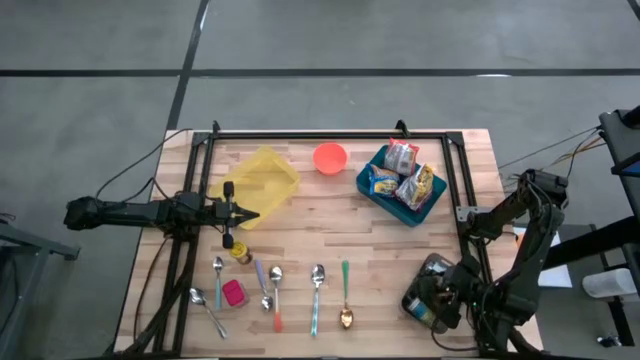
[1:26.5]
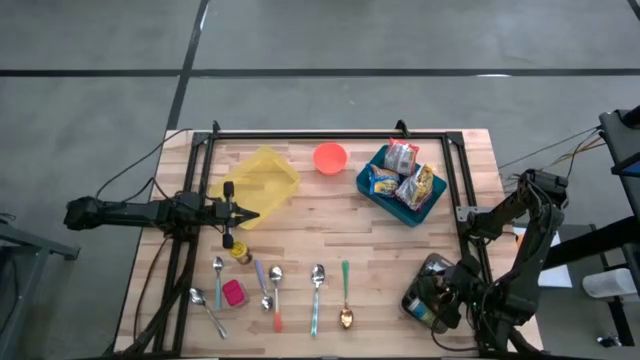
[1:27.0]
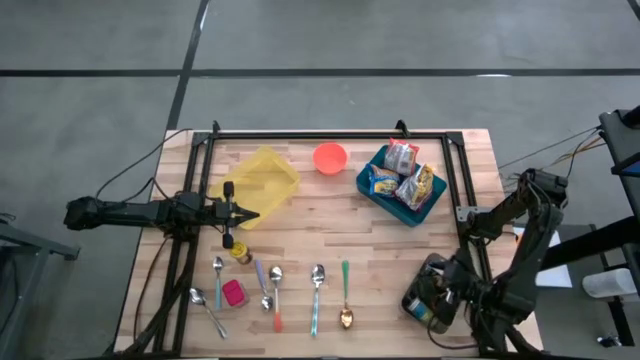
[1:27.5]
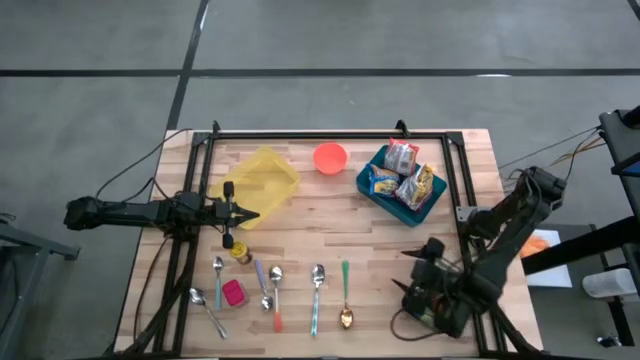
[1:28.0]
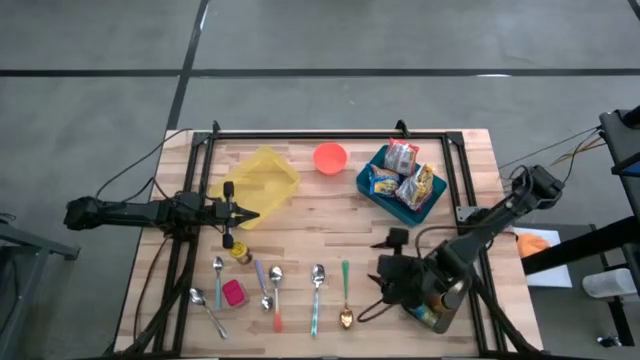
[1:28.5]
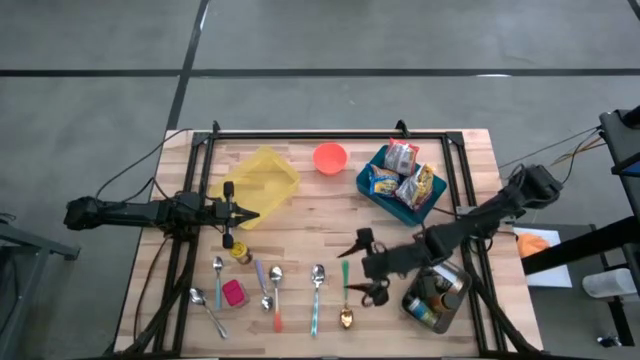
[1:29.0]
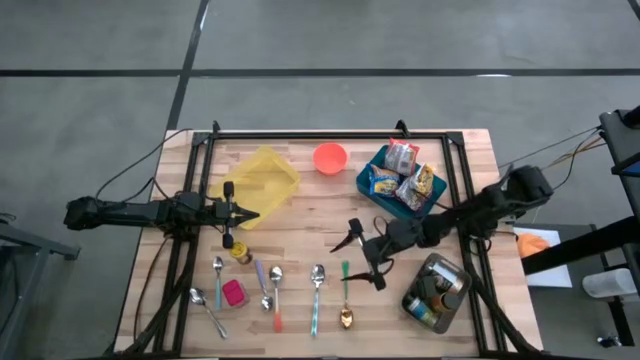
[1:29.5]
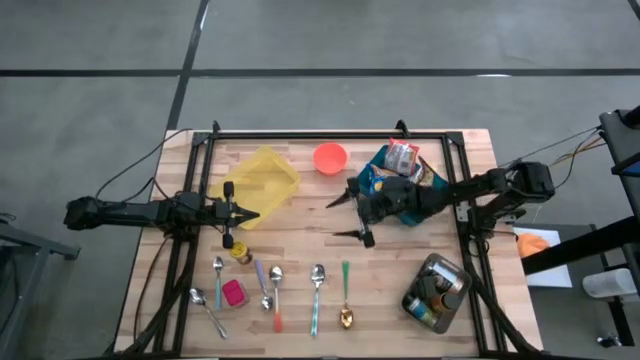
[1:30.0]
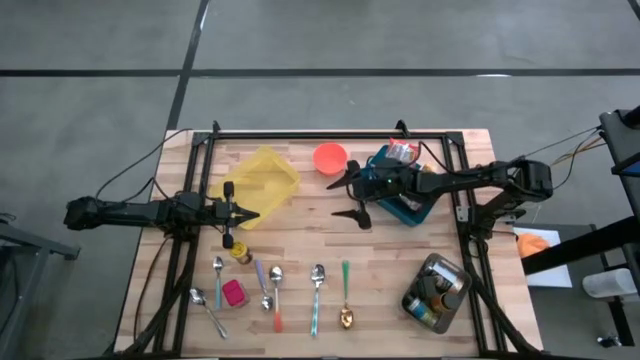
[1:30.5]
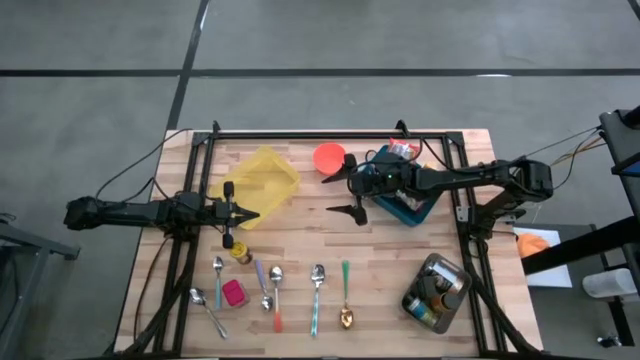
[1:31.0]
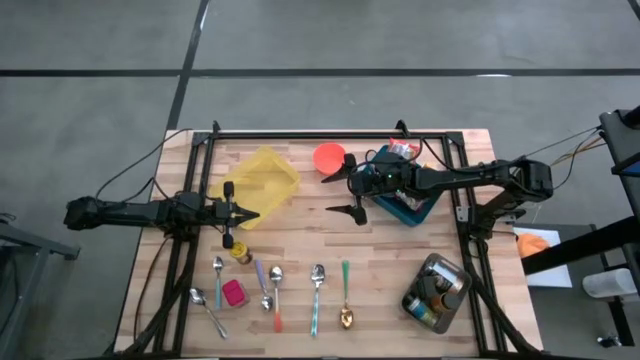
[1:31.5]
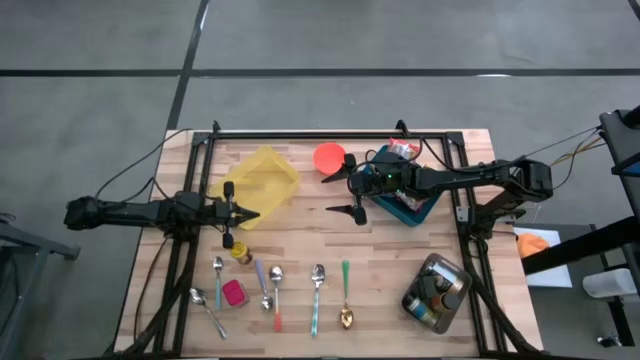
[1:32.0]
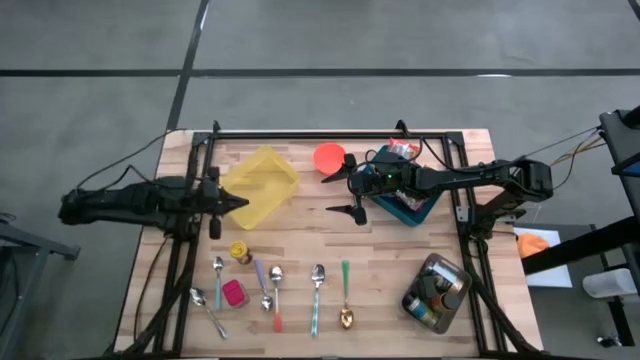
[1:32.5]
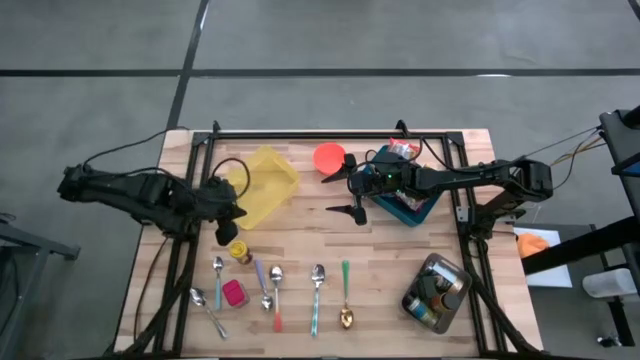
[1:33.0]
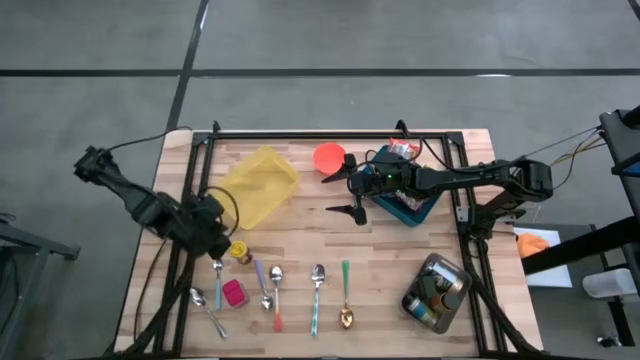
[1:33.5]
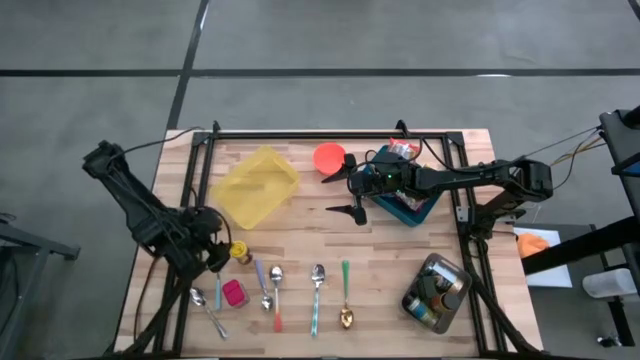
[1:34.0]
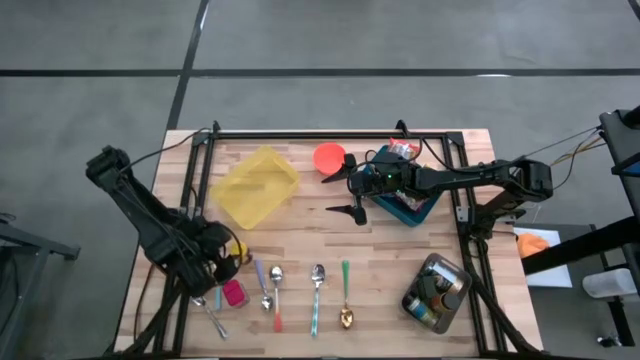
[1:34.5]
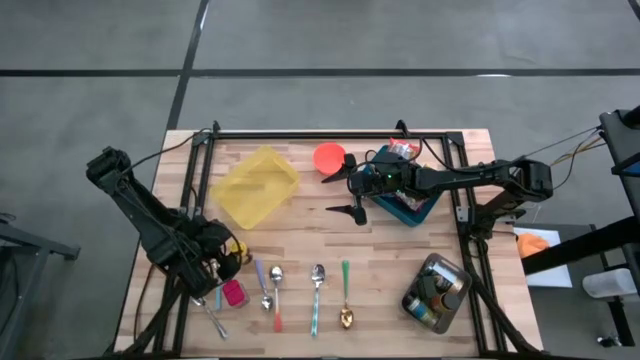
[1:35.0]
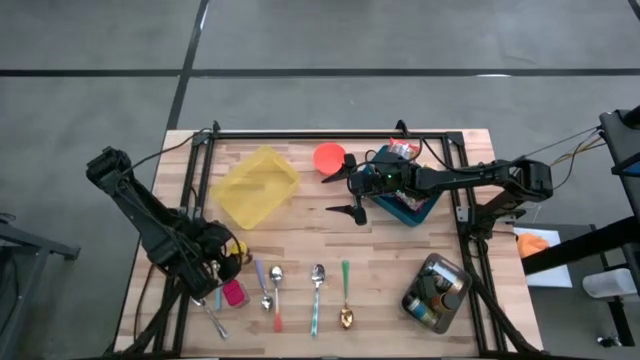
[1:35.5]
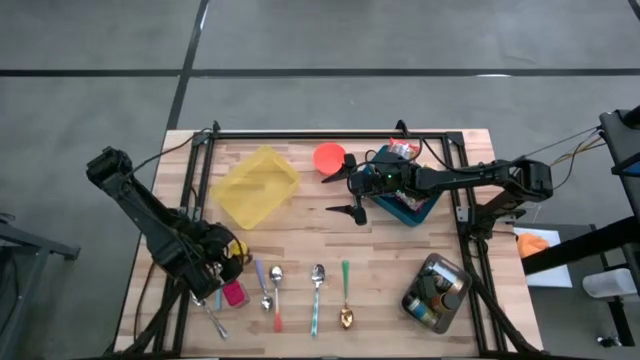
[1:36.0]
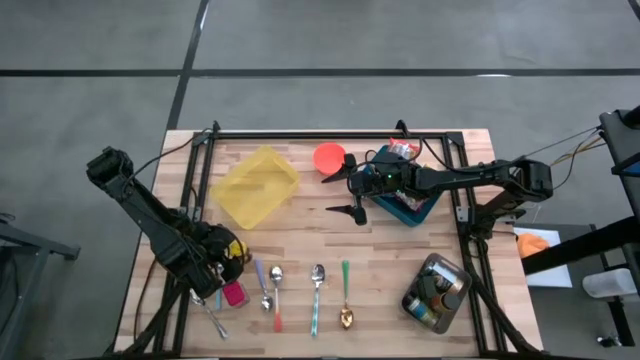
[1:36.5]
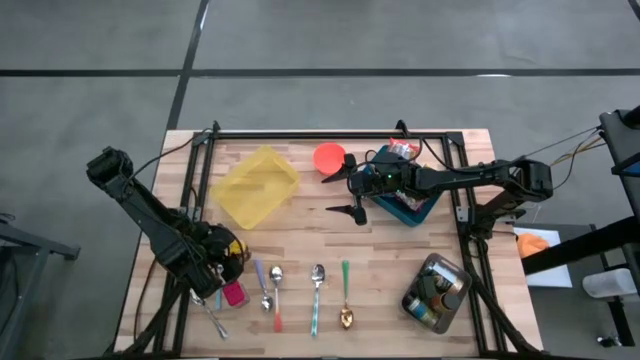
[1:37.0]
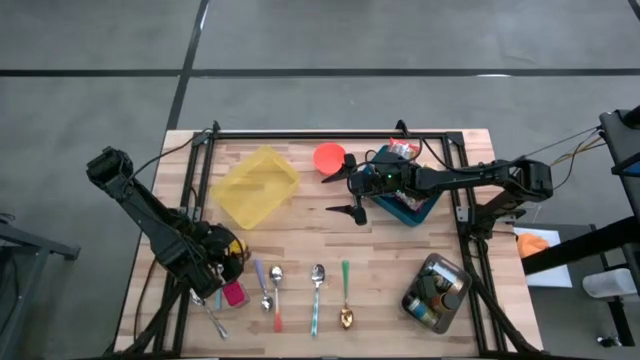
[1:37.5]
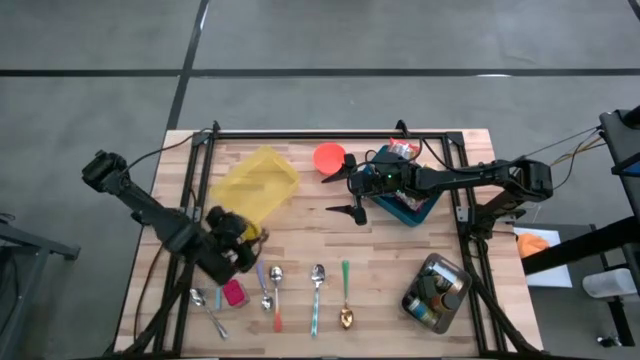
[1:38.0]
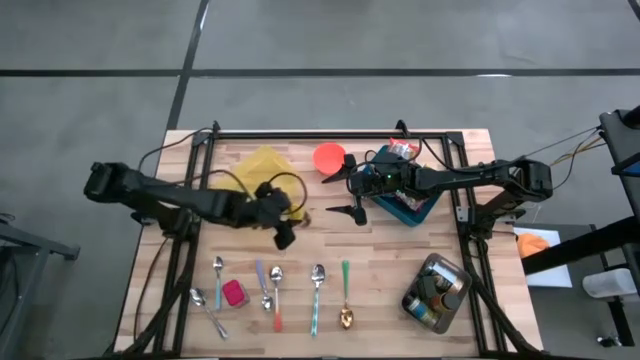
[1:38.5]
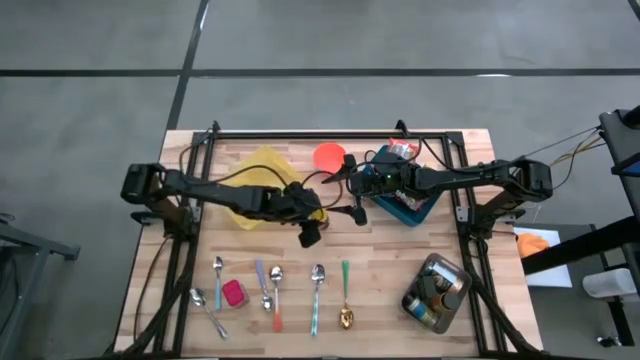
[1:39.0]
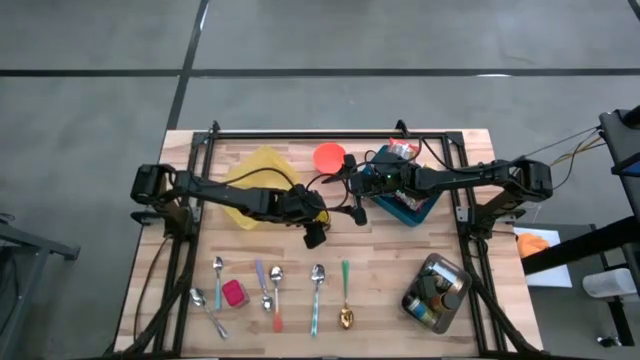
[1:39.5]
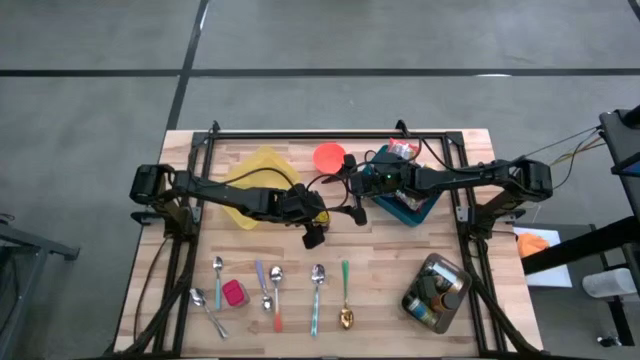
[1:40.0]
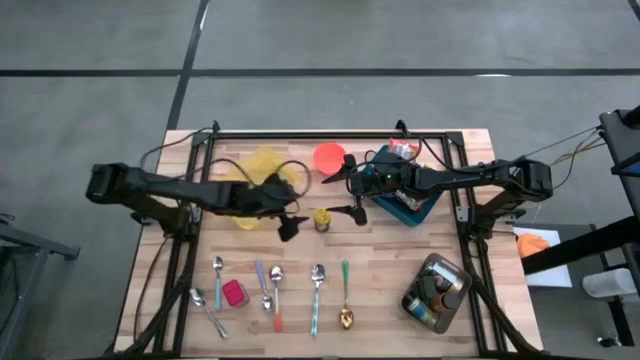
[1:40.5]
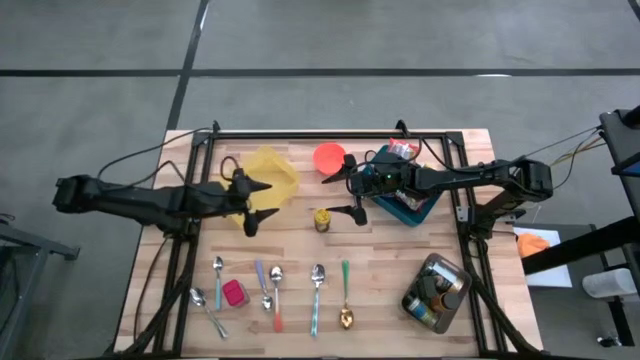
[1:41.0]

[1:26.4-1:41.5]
Put the yellow seasoning bottle into the black bin

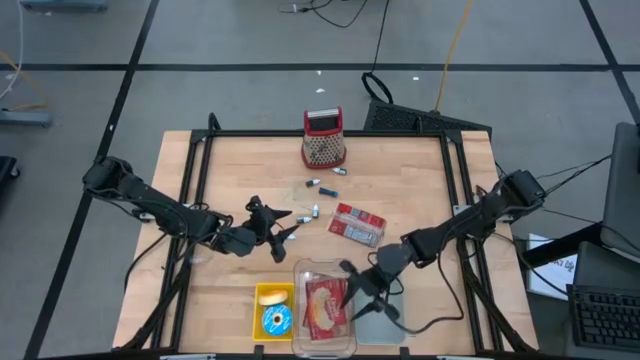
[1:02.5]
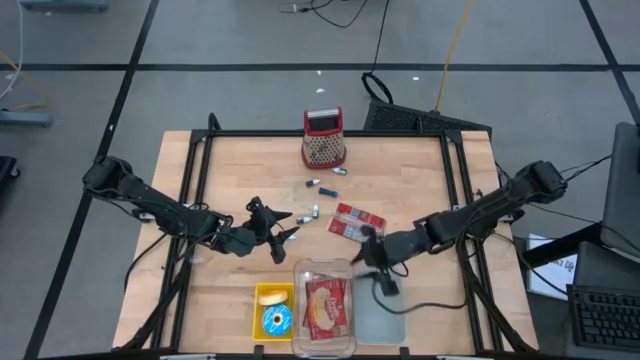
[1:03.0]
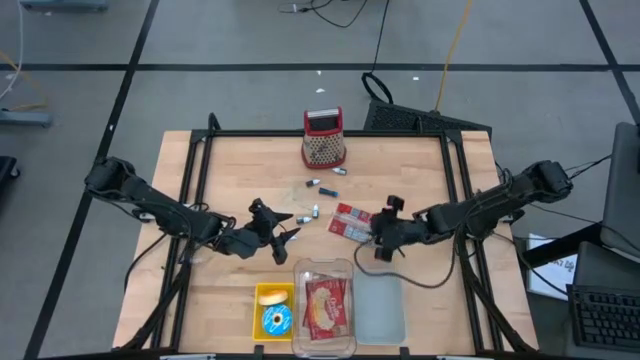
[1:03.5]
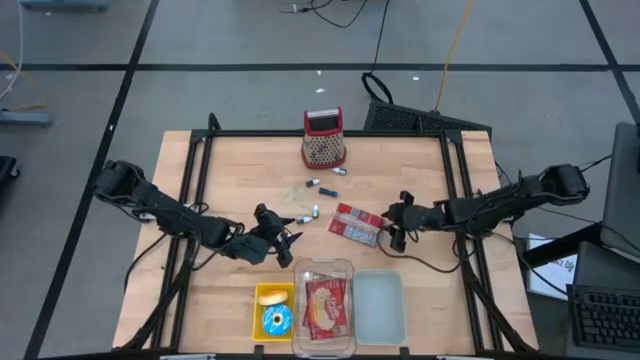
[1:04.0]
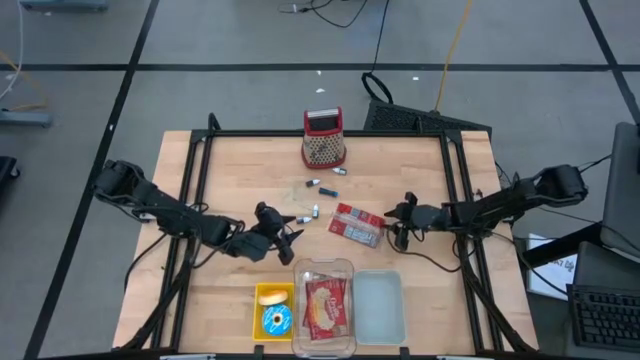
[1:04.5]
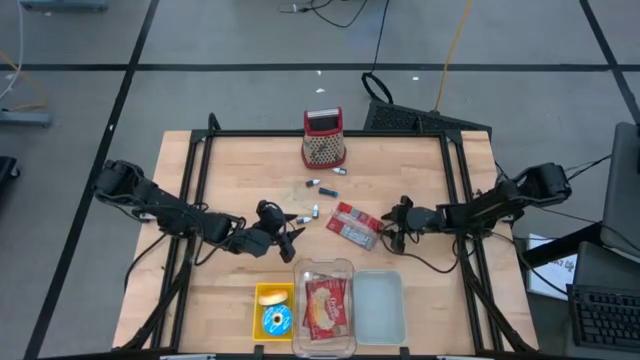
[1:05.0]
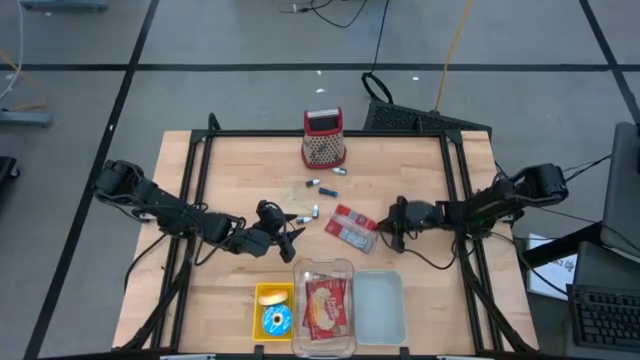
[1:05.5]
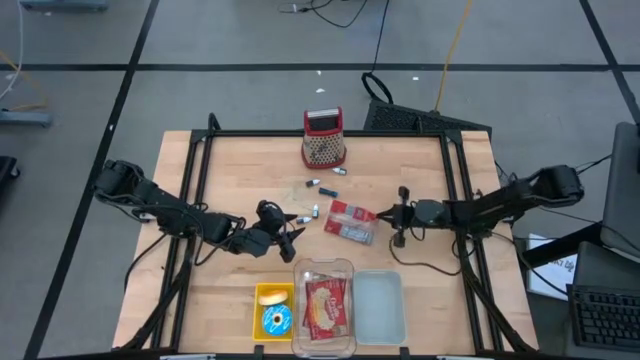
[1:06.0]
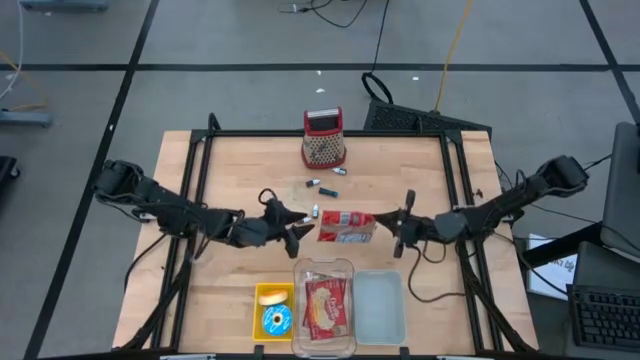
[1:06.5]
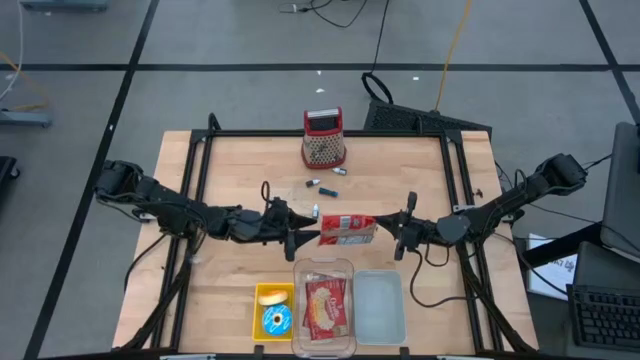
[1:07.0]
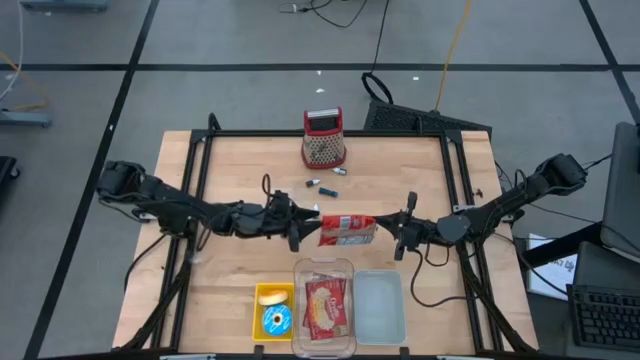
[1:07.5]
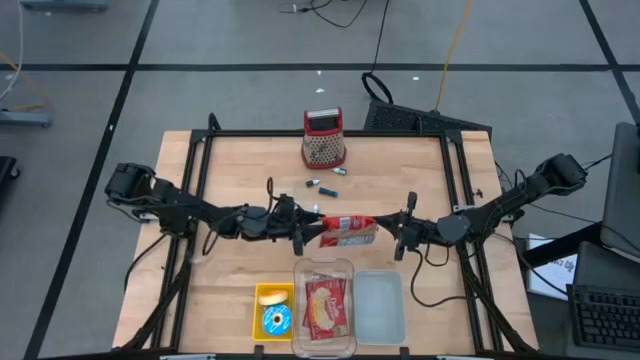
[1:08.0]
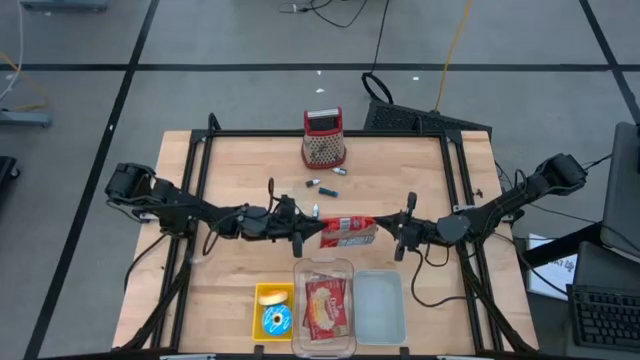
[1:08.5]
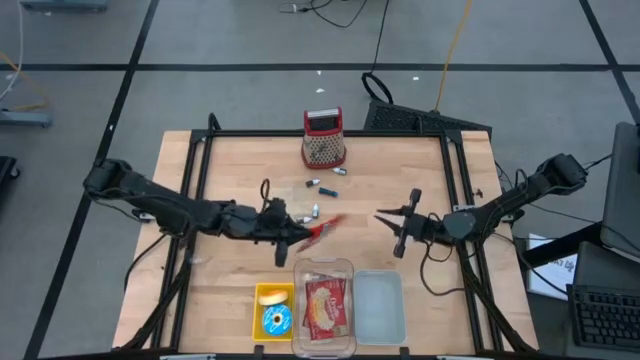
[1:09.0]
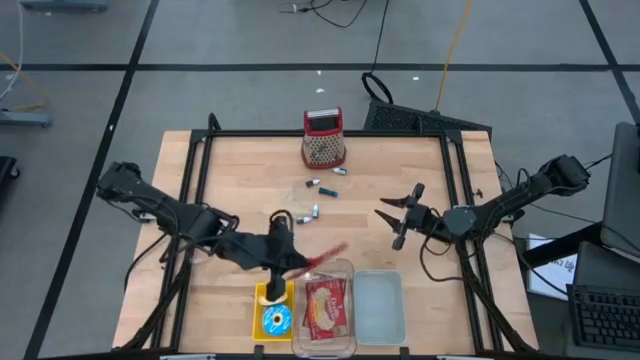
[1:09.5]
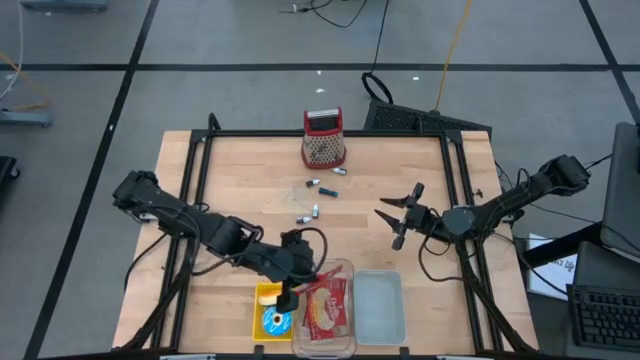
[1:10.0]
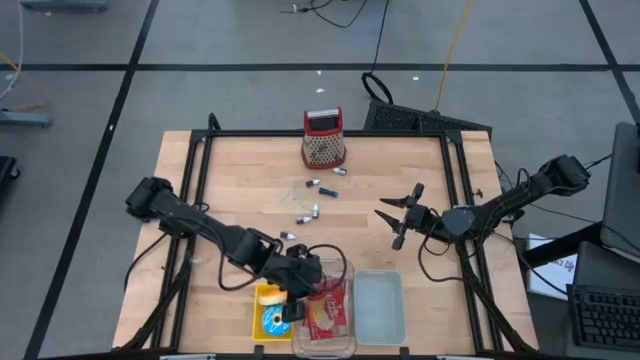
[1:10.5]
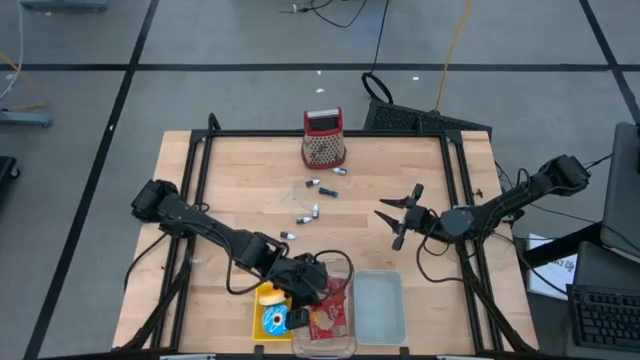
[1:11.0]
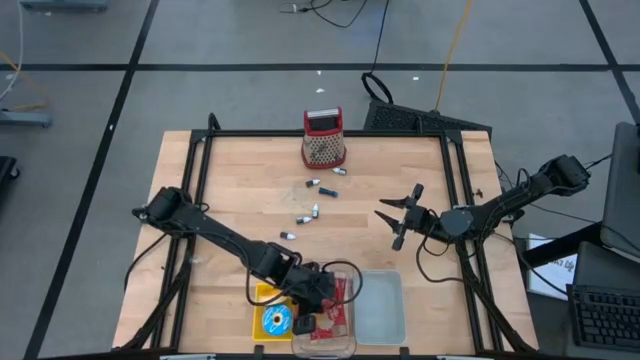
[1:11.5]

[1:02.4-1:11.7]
Put the popcorn bag into the transparent bin
